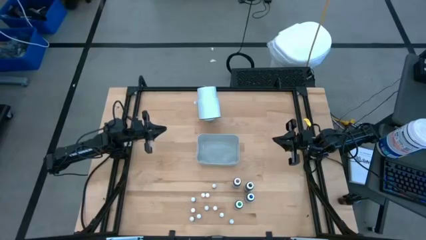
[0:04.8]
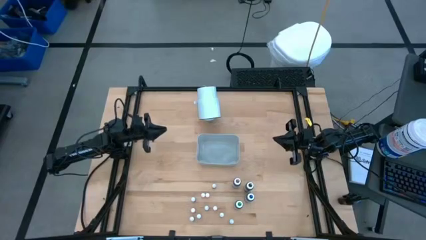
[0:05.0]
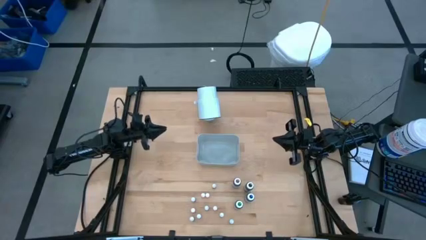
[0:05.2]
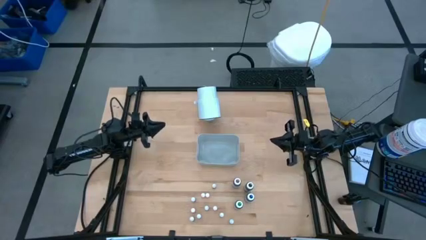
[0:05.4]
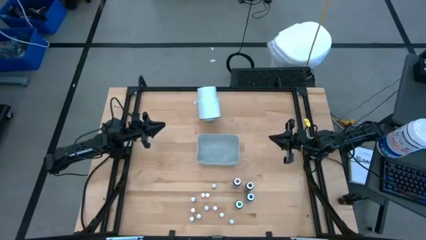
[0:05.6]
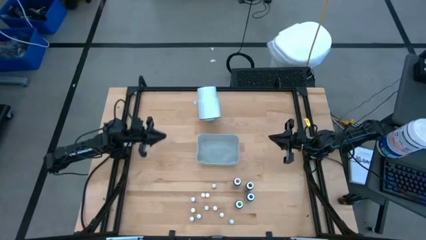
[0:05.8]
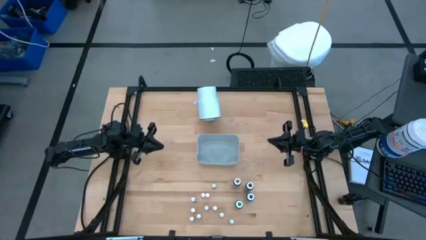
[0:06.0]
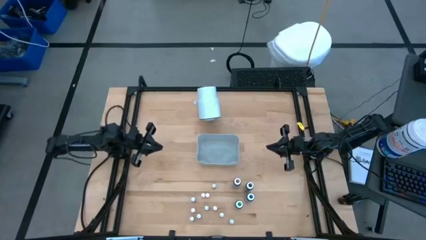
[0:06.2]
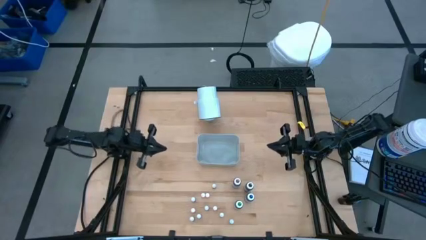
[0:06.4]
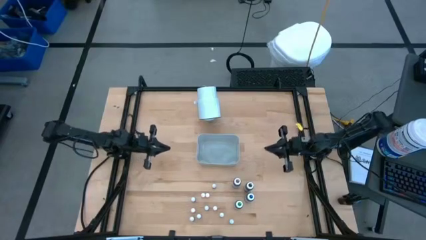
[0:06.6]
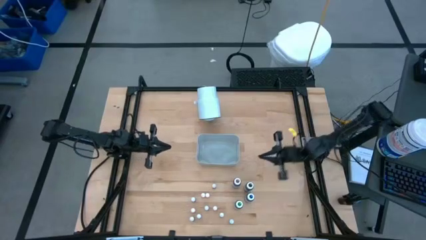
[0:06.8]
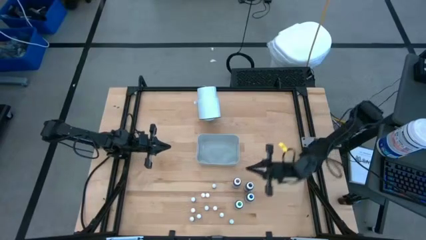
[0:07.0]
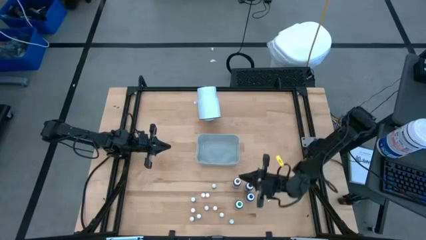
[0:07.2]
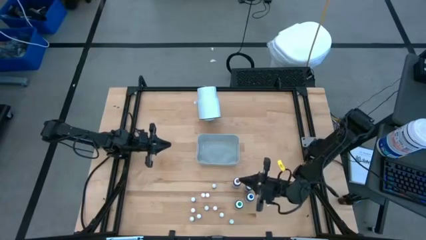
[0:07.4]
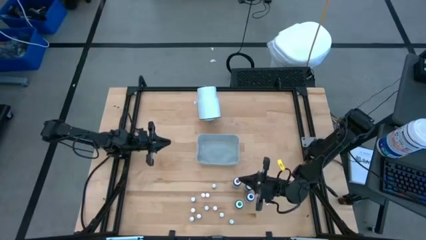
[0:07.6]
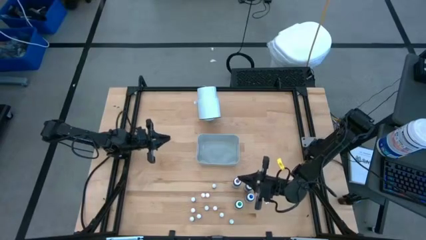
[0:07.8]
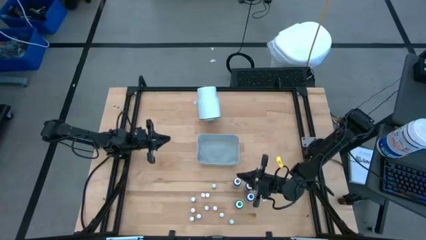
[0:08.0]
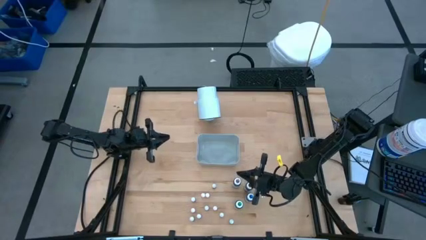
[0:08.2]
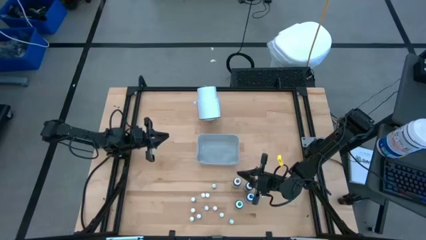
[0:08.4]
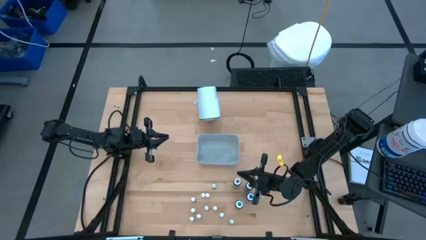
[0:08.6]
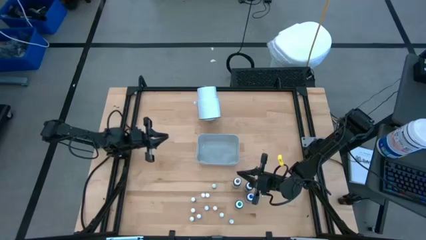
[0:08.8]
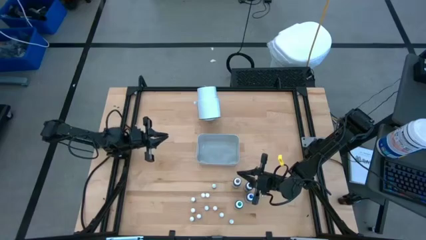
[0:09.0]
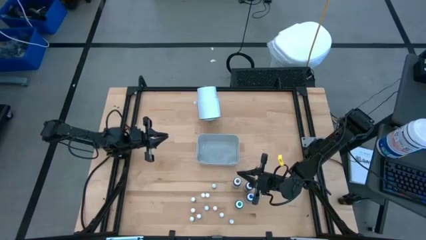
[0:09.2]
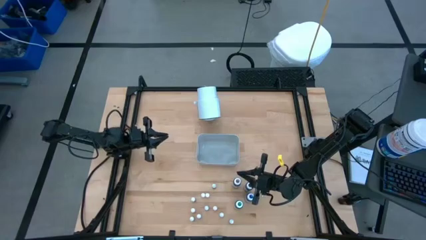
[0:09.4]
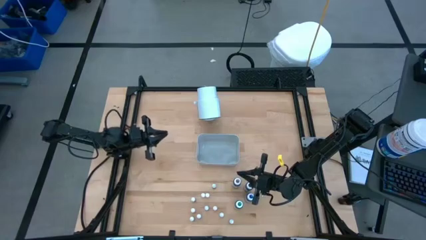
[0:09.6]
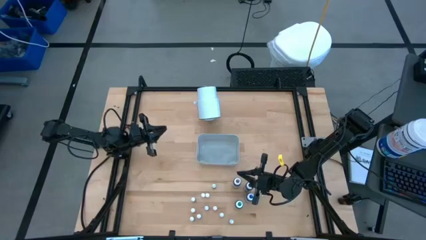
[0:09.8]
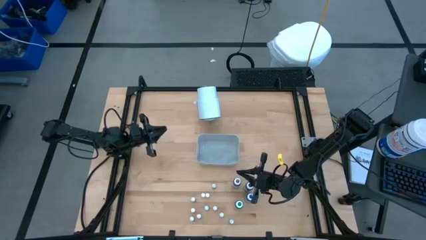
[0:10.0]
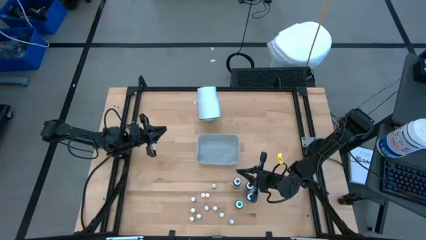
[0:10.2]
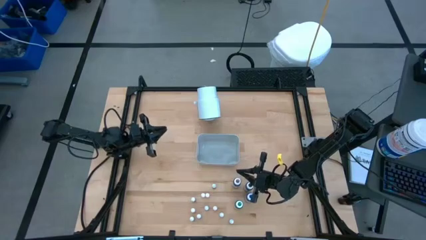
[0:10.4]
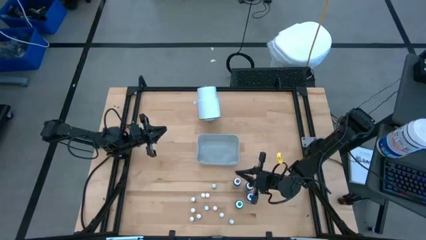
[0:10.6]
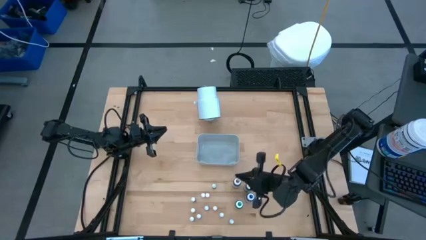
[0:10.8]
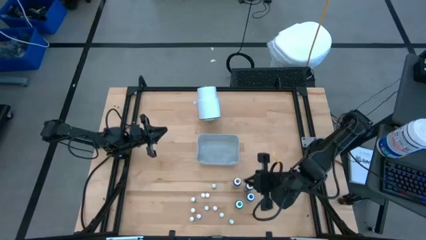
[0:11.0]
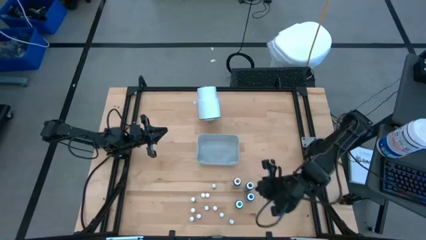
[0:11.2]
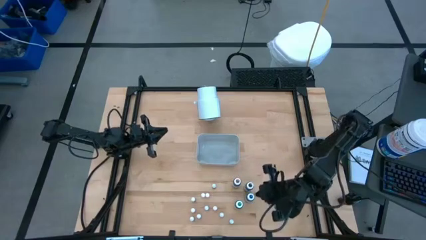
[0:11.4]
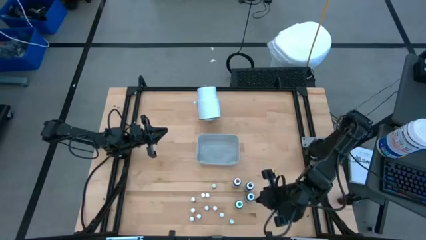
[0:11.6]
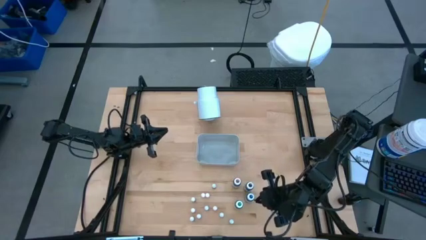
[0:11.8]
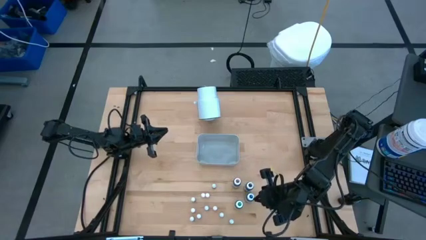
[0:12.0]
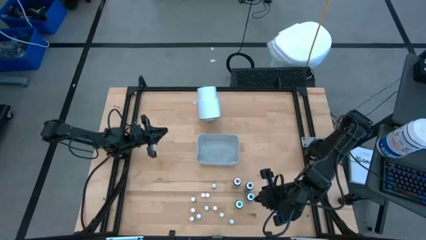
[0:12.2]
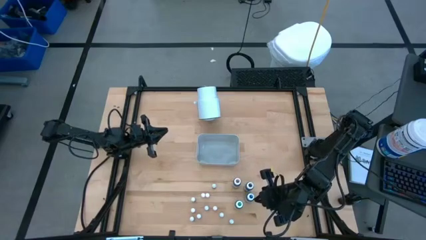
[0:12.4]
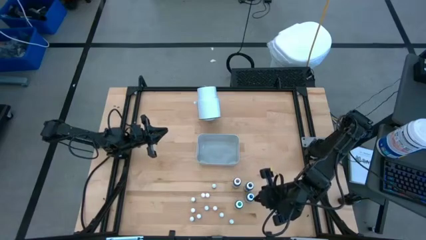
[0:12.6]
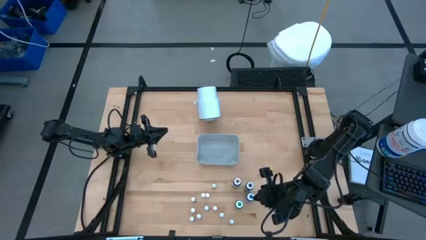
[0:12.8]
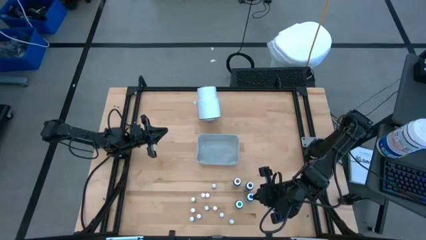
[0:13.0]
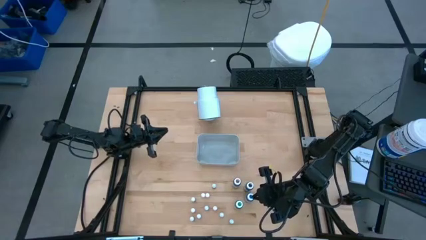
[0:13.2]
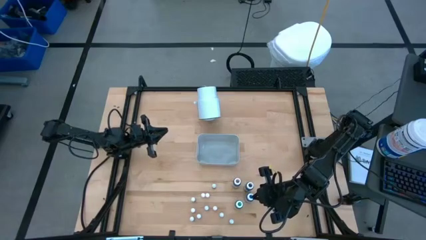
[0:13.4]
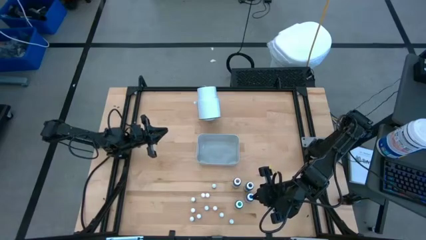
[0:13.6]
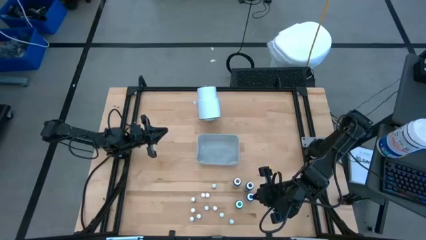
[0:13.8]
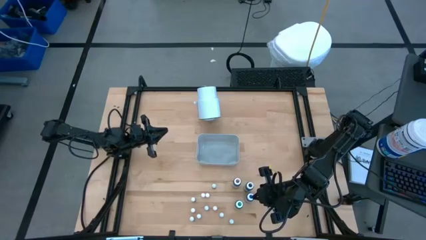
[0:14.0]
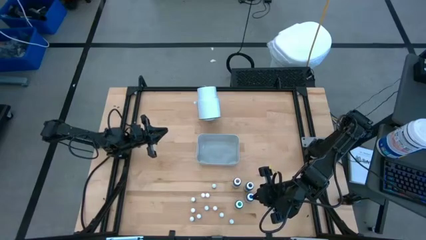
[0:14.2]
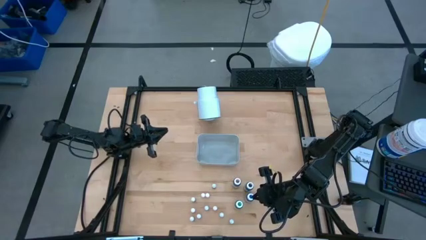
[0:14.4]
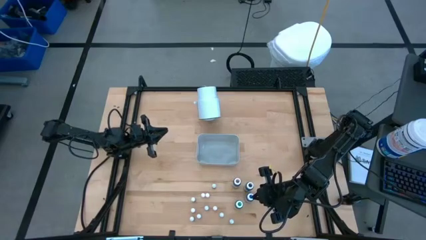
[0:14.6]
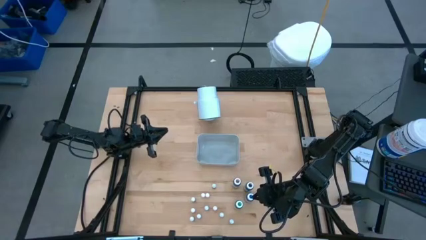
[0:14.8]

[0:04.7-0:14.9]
Task: Pick & Place food coloring
Put the purple food coloring bottle into the gray bin

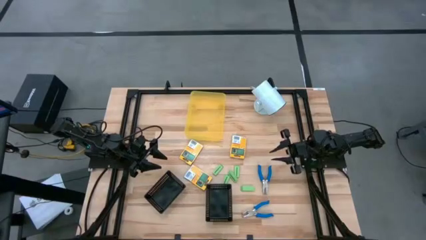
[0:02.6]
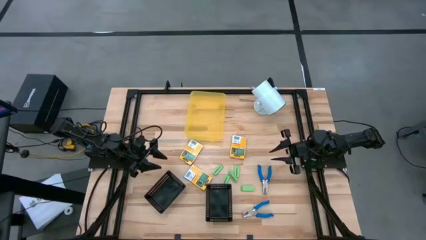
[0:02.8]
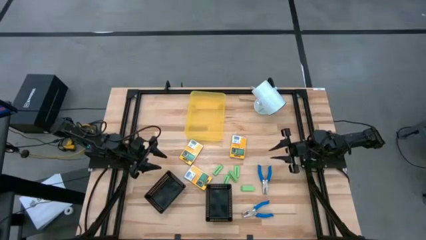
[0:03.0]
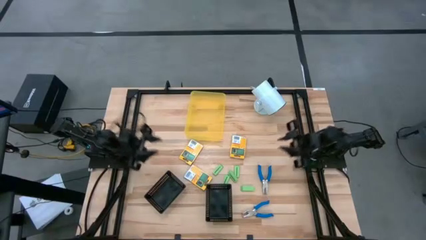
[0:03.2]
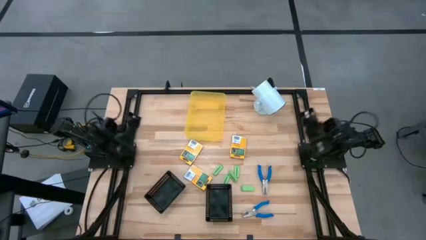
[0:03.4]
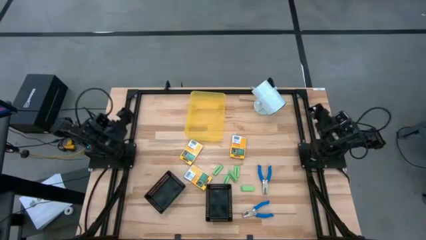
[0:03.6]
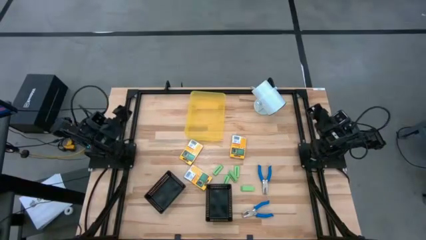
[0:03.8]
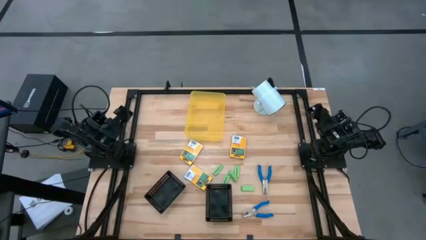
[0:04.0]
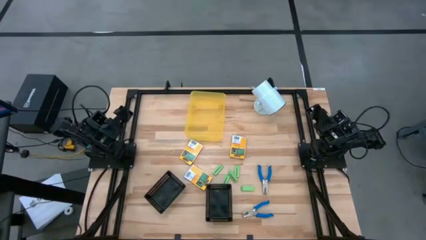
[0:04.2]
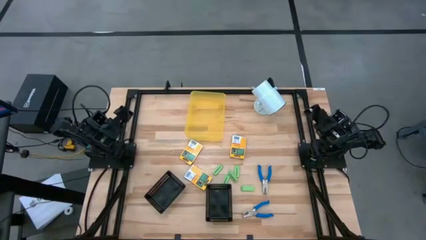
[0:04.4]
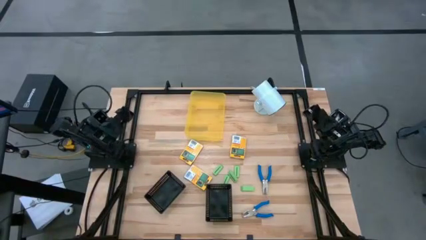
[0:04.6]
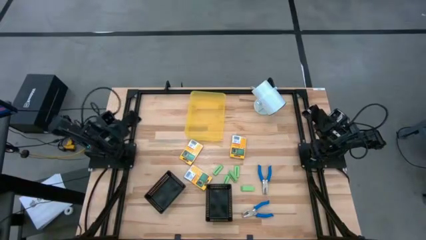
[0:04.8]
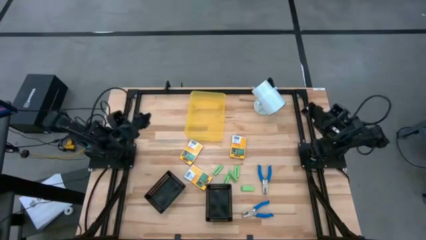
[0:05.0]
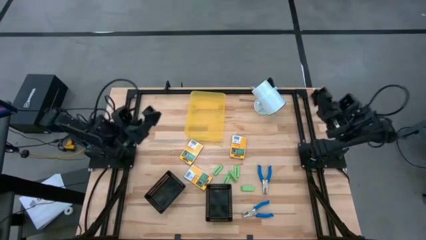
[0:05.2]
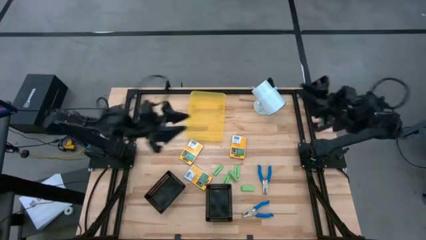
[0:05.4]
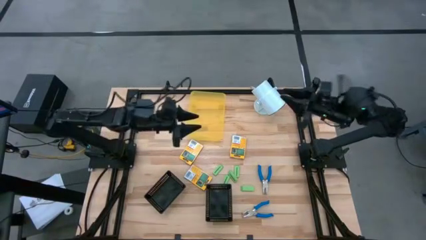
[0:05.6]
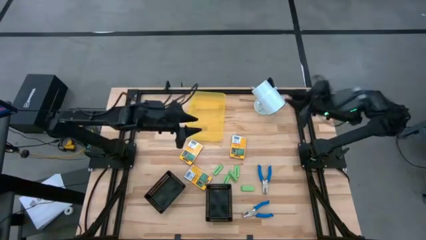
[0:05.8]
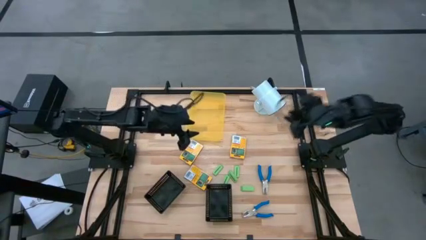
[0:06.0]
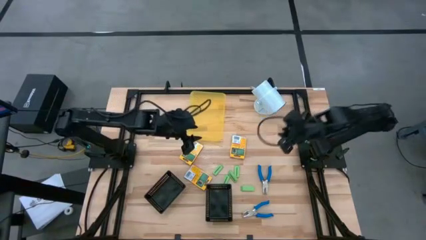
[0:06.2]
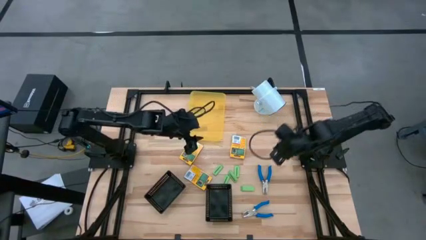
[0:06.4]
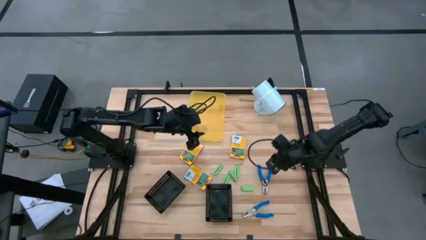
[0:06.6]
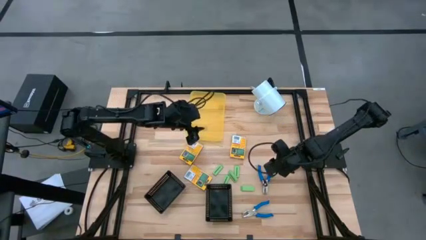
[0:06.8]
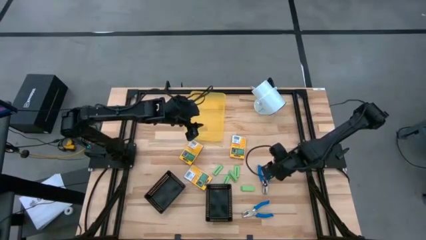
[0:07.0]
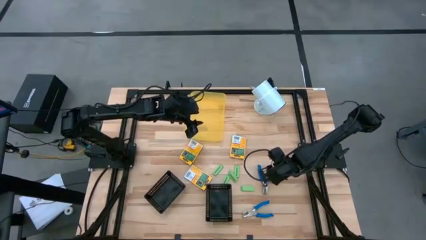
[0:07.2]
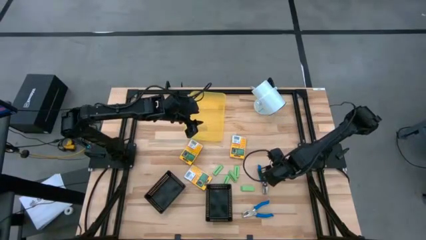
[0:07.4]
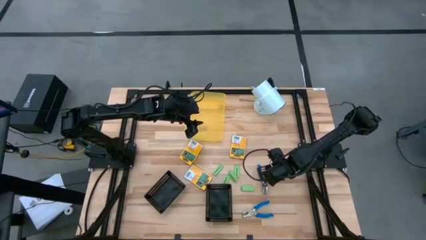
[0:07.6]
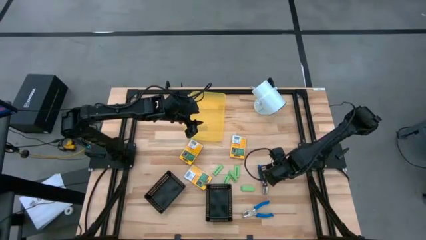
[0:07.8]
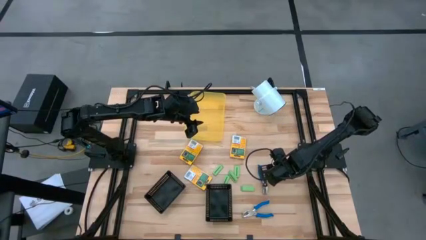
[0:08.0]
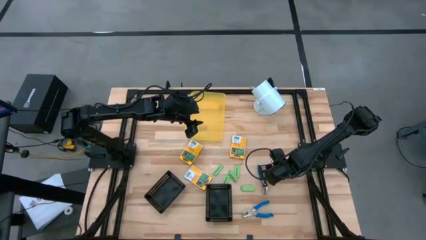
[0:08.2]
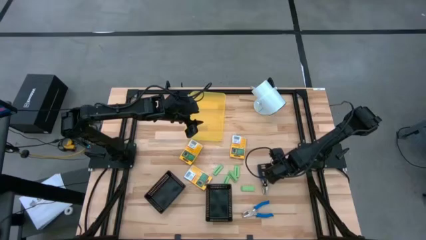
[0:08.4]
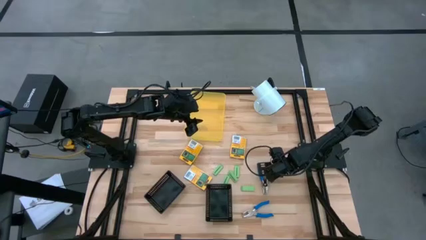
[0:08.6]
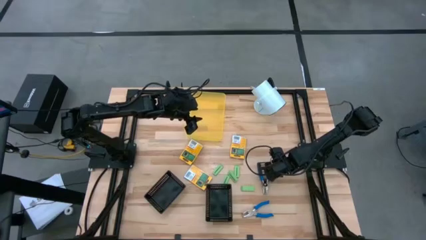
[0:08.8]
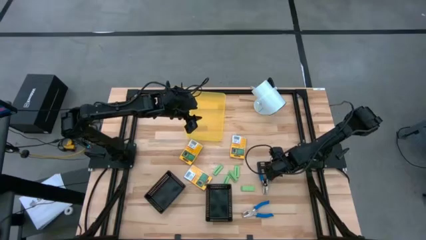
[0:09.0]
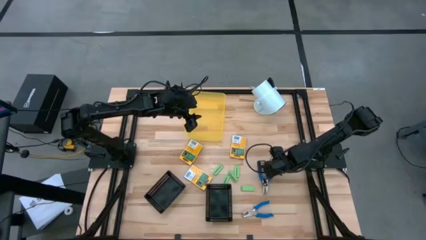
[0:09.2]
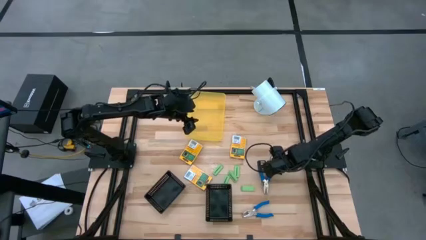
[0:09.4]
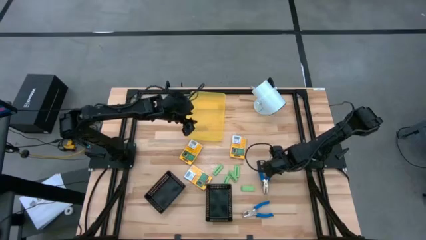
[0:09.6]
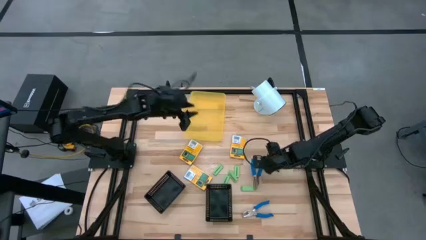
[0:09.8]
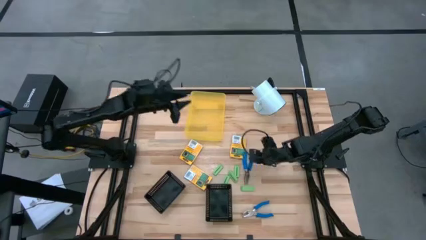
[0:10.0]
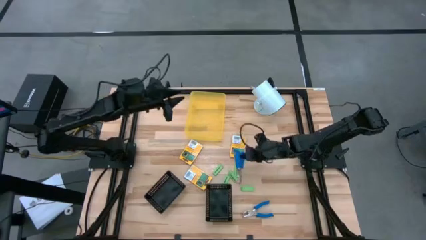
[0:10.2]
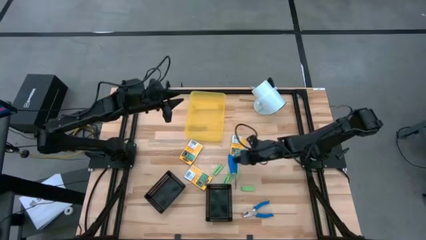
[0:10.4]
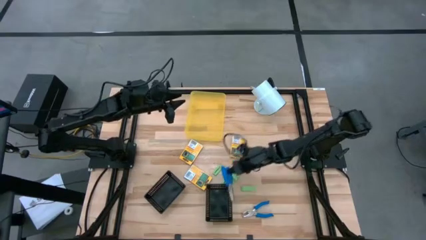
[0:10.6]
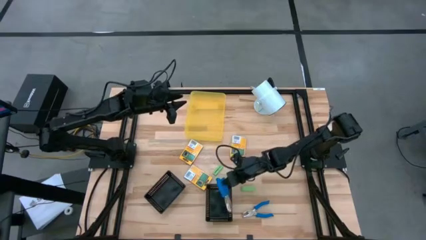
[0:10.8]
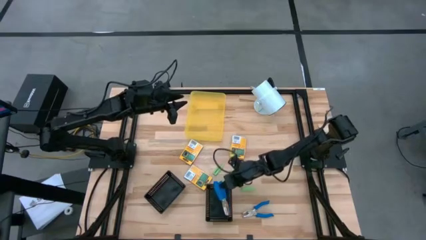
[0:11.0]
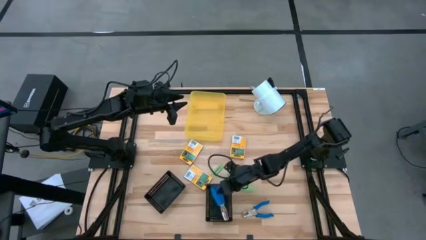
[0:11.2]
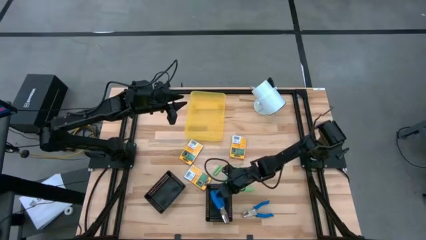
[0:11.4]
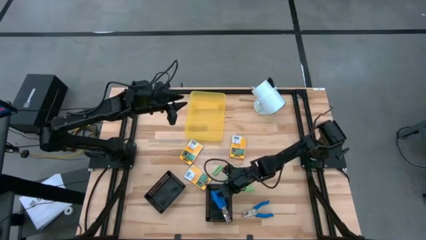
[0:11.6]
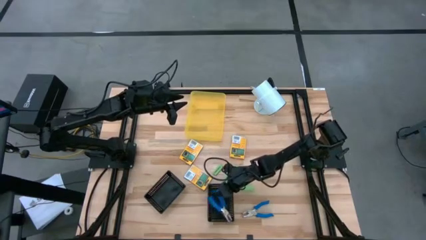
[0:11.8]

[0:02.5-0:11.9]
Task: Pick & Place School Supplies
Put the blue puncher into the right black bin
